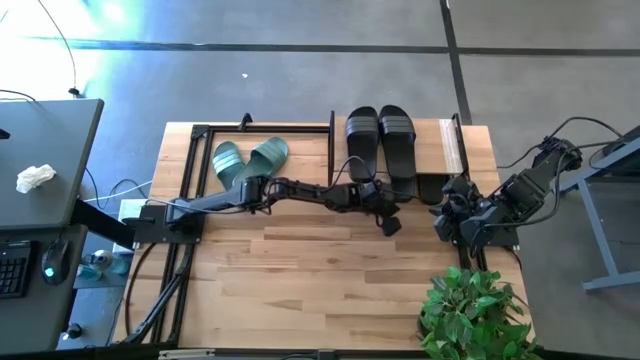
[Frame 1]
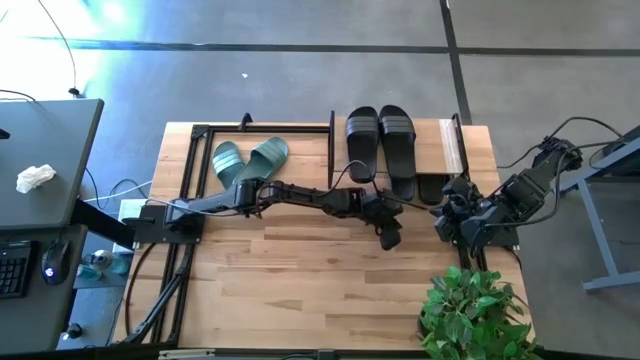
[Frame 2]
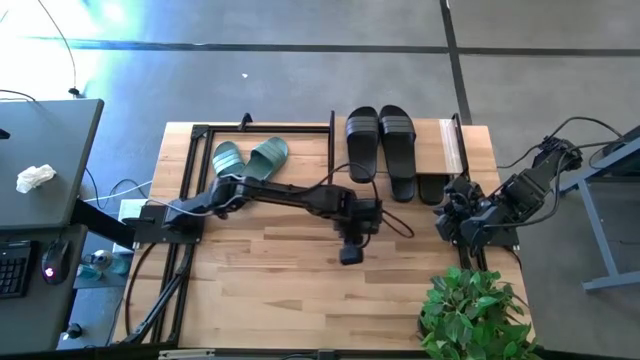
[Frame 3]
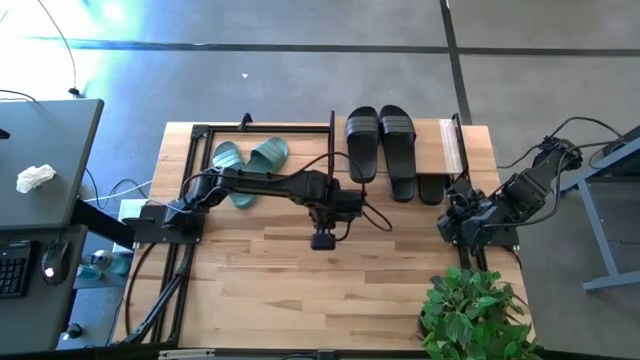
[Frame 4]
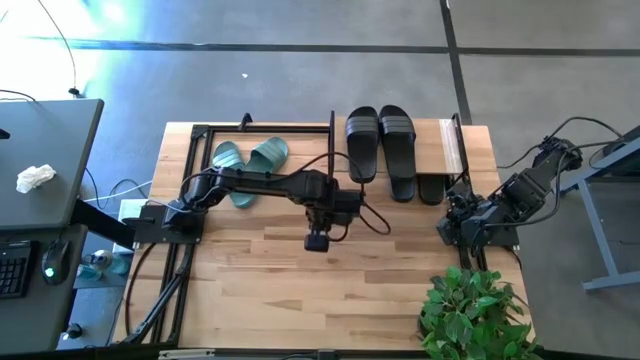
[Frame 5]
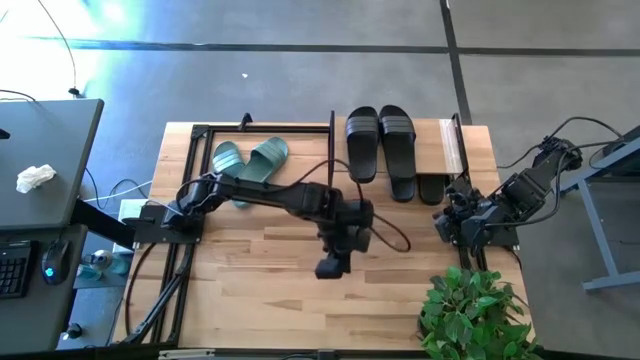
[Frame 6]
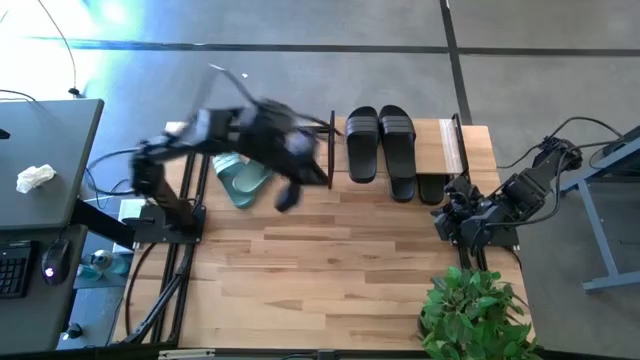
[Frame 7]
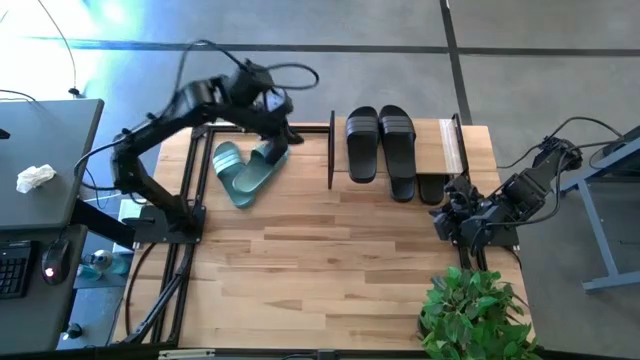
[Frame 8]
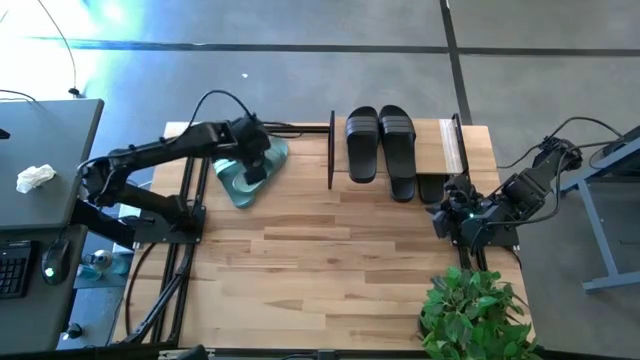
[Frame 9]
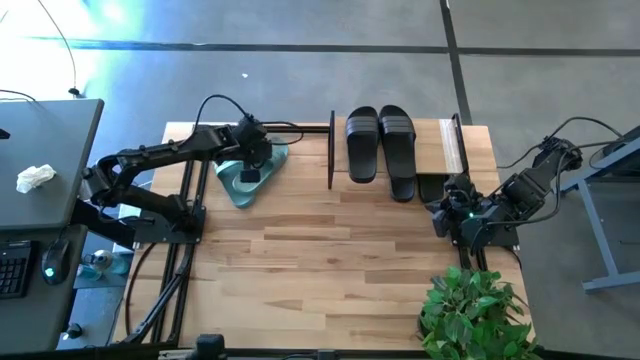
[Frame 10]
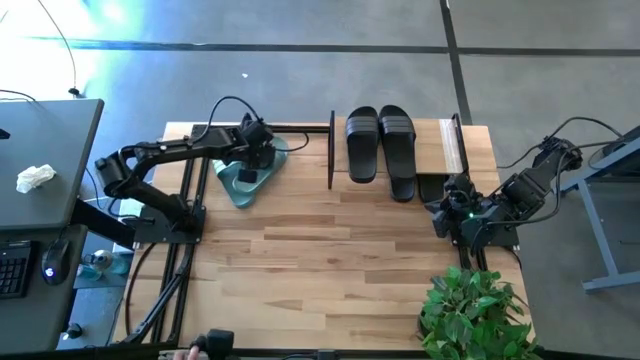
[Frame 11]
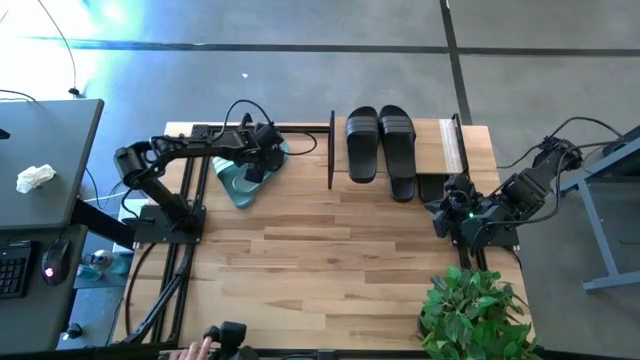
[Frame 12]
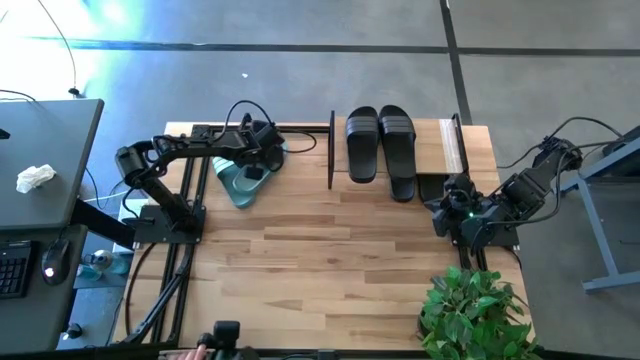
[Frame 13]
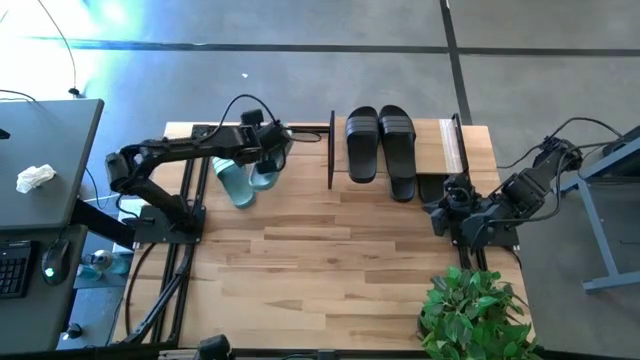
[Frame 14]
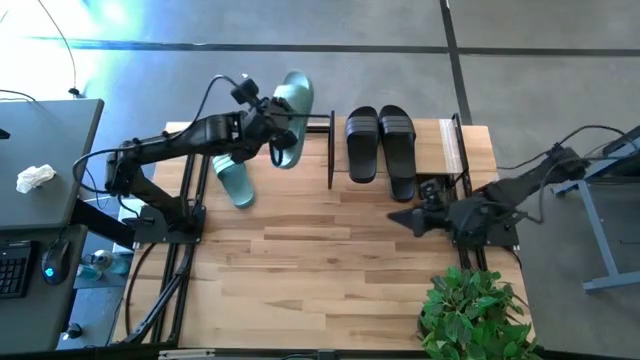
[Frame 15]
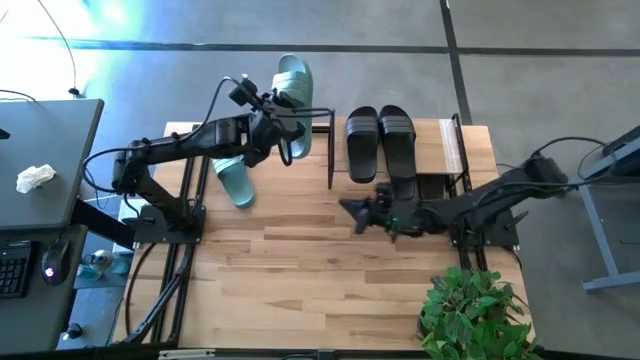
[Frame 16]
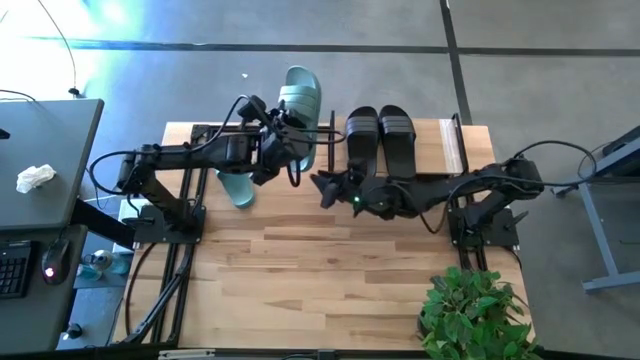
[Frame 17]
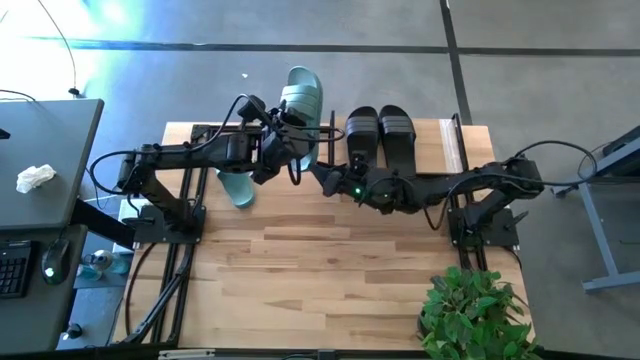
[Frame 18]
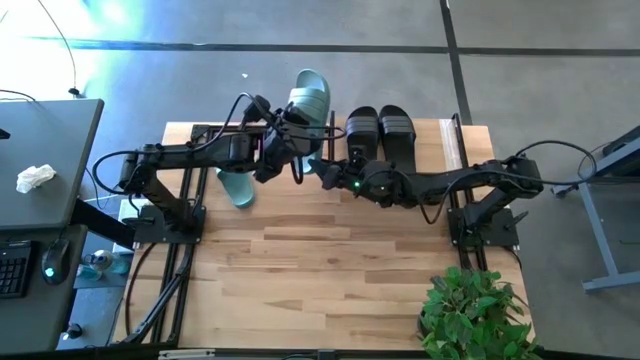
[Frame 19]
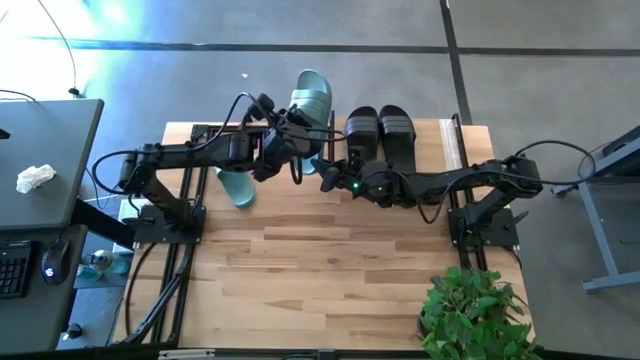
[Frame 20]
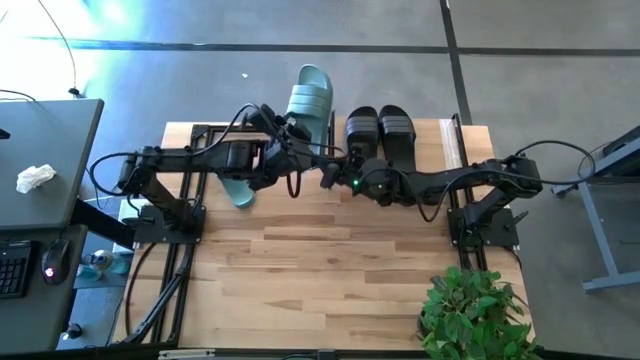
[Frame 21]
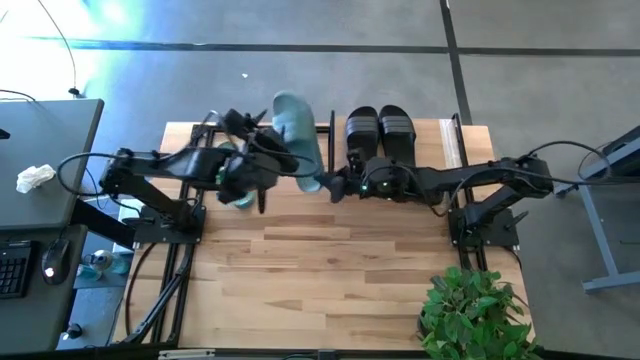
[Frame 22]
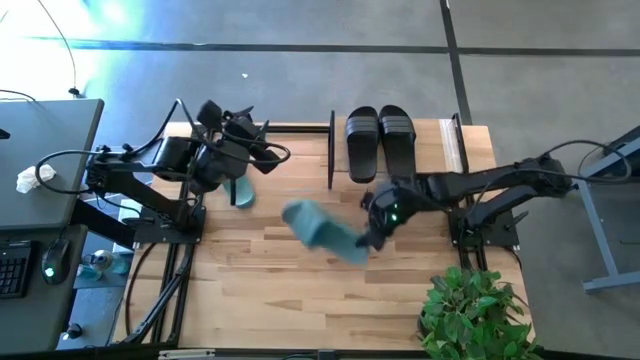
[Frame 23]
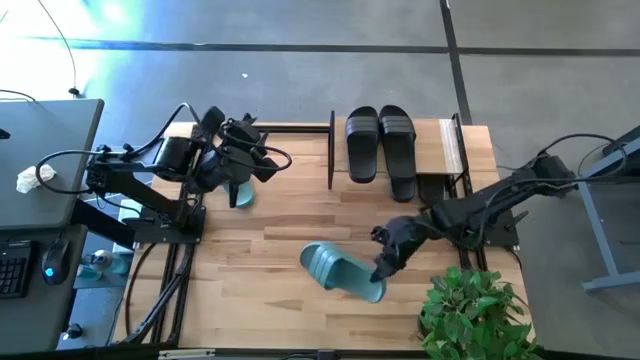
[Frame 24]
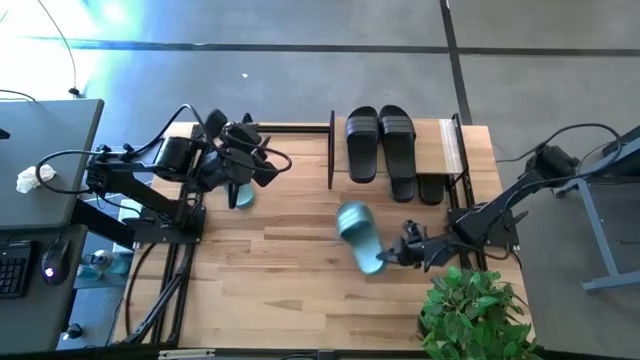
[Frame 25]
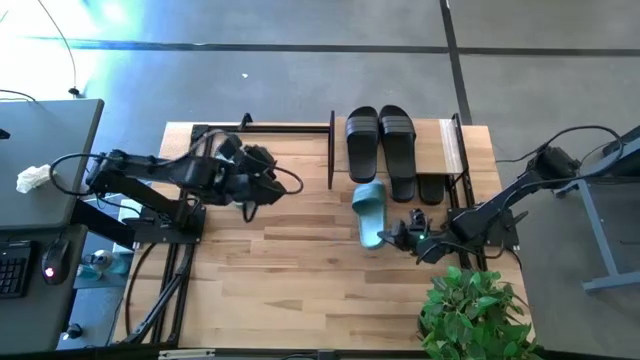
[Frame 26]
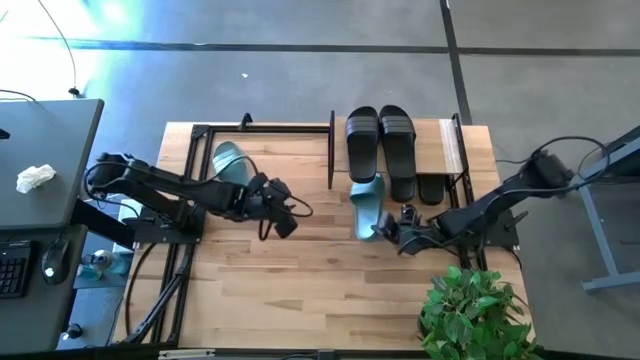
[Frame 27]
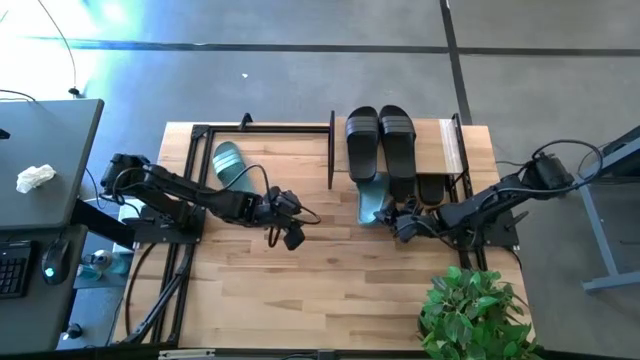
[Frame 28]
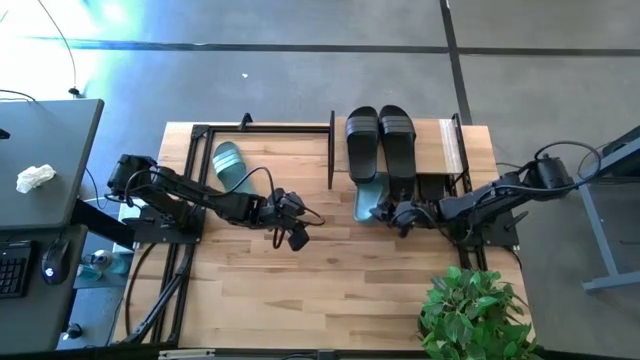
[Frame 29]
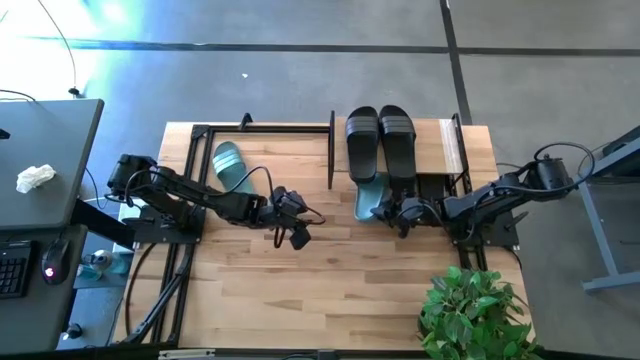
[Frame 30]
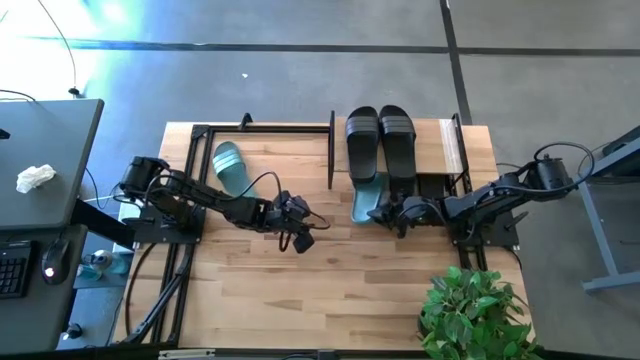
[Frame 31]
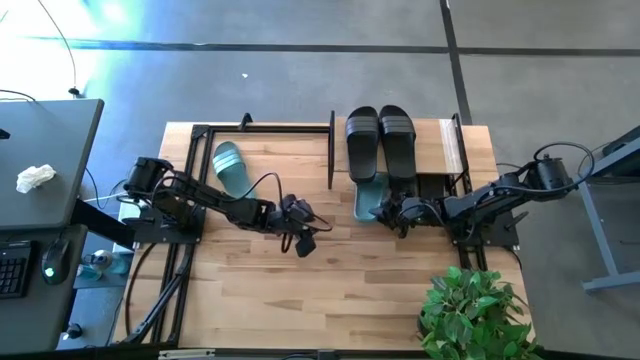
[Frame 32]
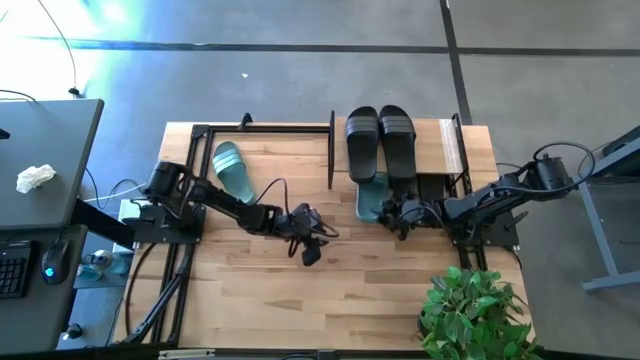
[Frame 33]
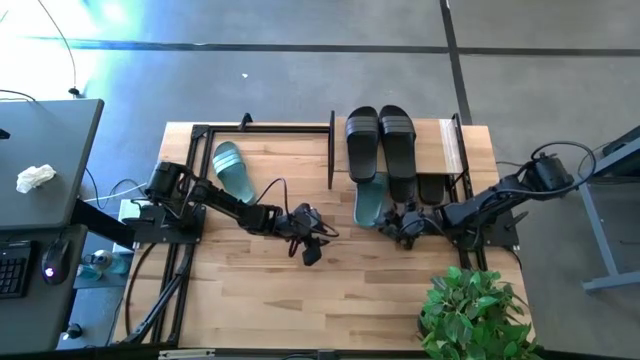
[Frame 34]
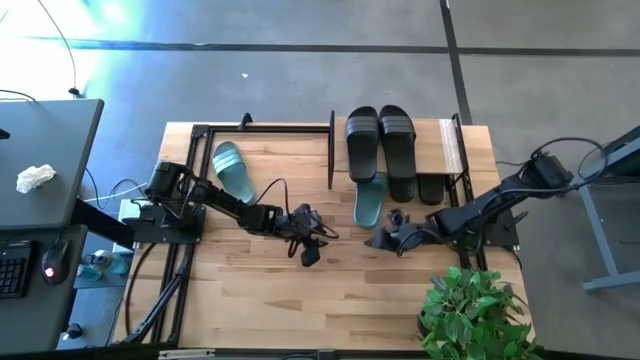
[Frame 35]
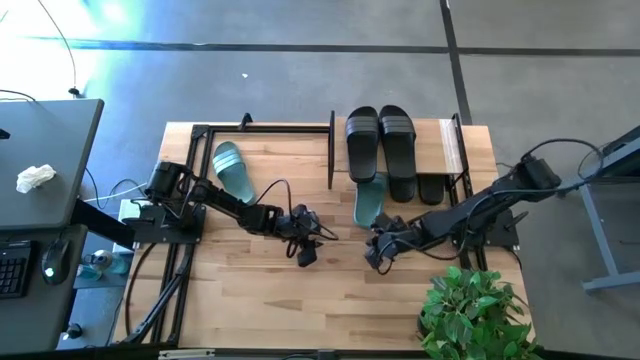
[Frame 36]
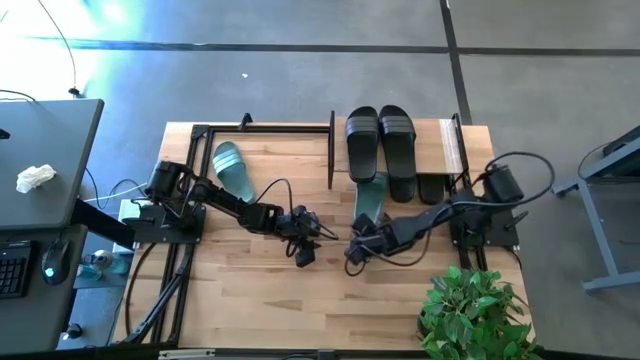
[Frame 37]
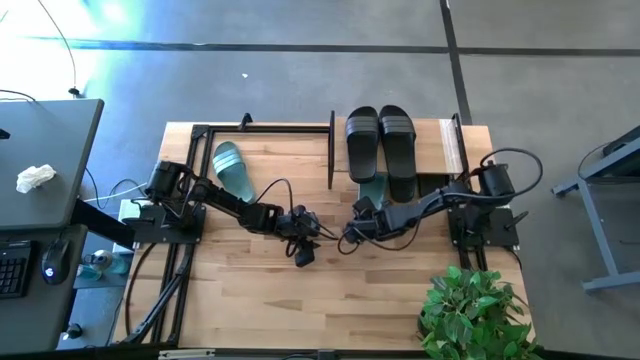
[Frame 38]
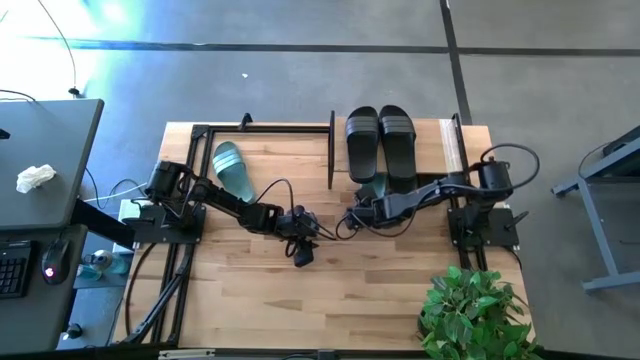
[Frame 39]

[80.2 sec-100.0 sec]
Task: Pick and place slides into the shelf
Put the green slipper under the shelf

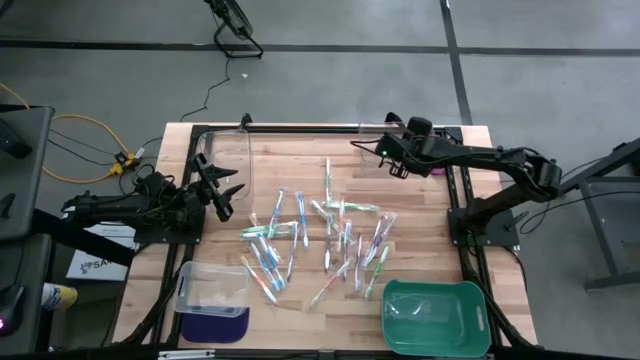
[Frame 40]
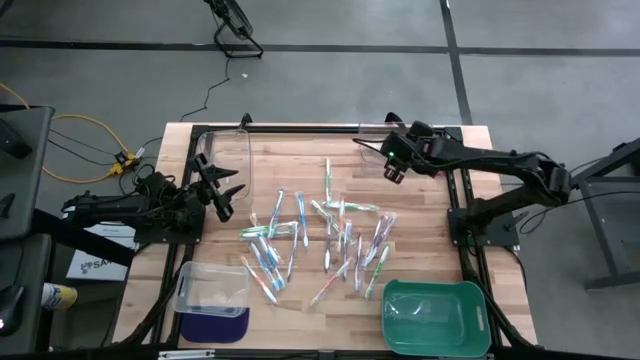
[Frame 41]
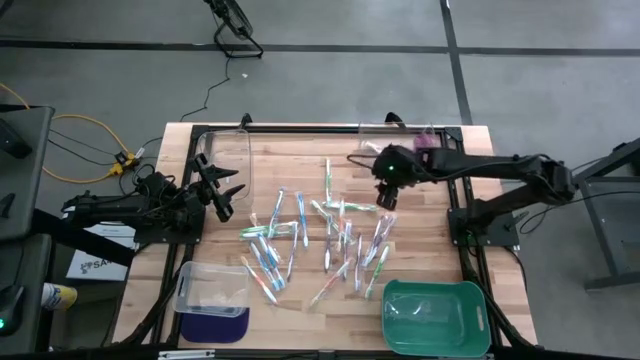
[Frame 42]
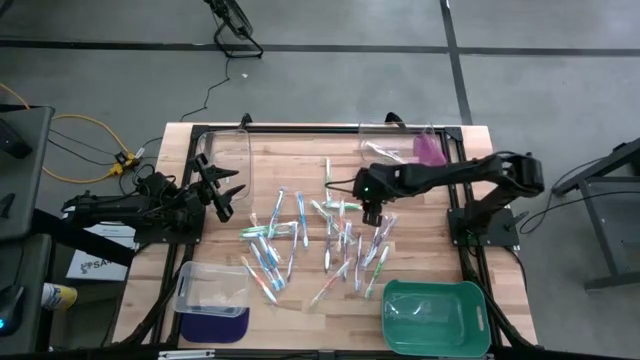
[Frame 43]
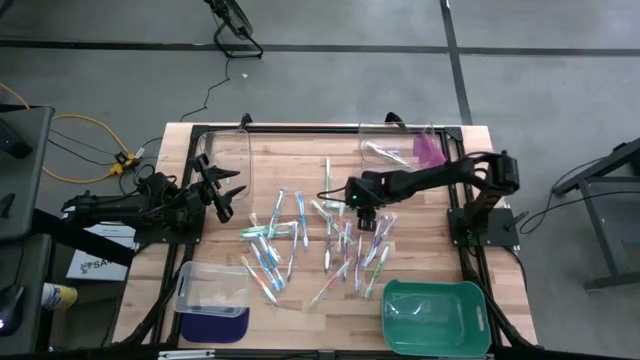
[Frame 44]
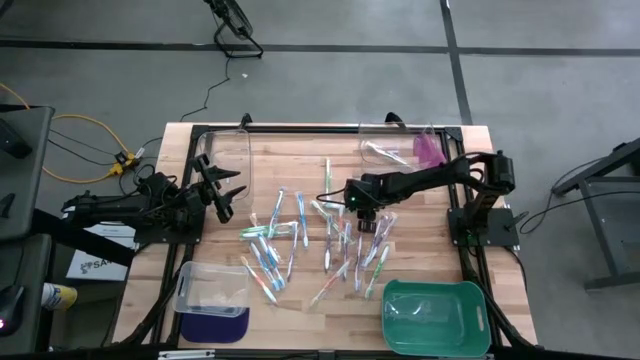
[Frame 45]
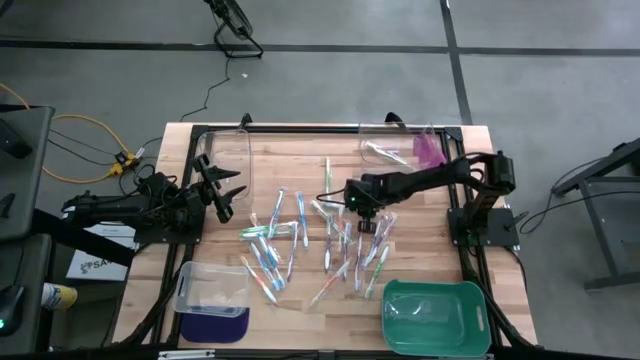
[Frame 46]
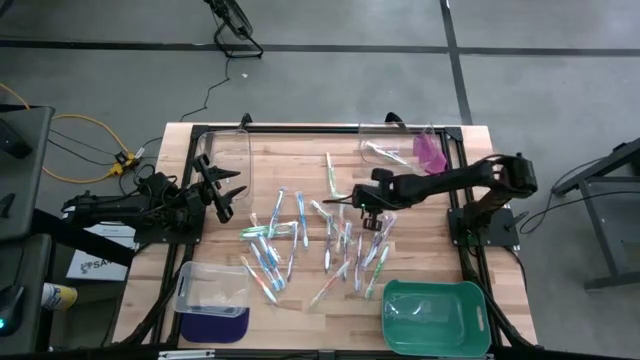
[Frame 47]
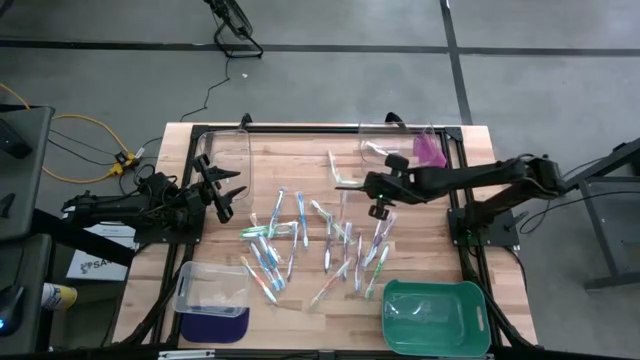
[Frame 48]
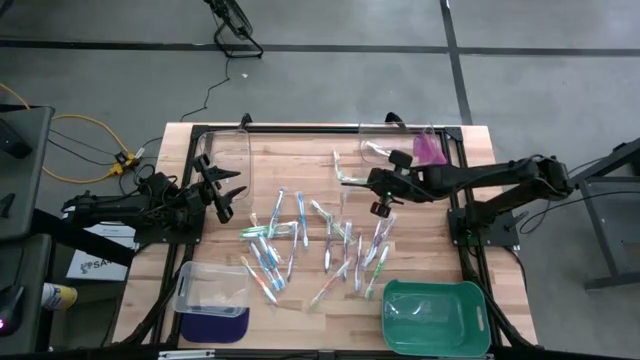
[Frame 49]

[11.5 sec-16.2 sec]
Task: Pick & Place Toothbrushes
Put the green toothbrush into the top right transparent bin
